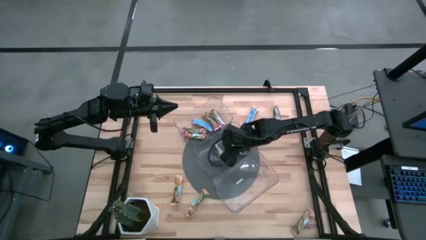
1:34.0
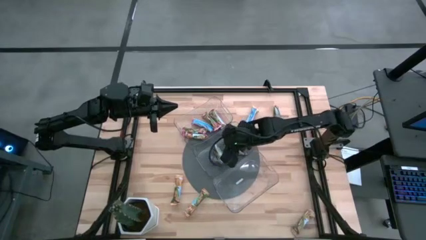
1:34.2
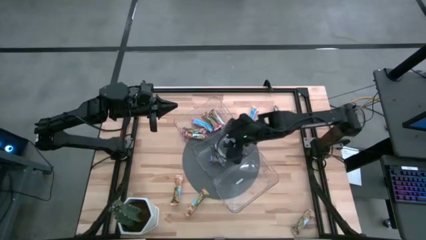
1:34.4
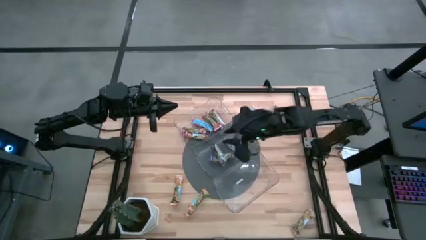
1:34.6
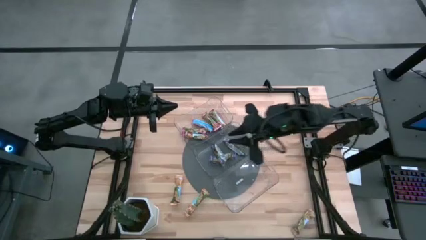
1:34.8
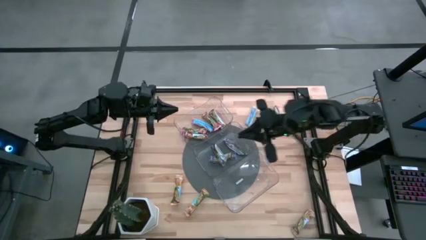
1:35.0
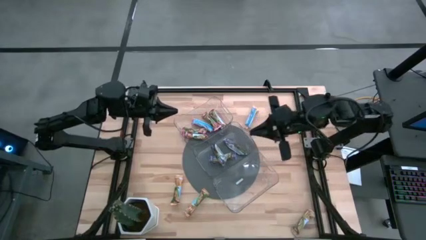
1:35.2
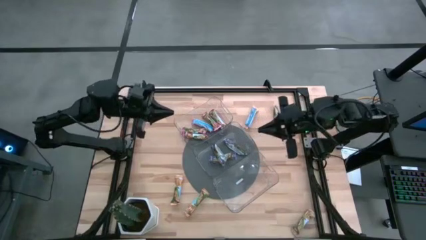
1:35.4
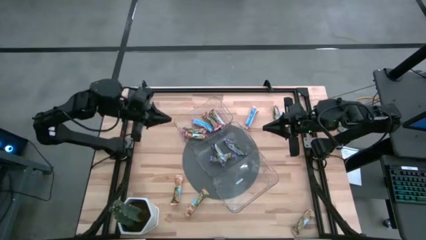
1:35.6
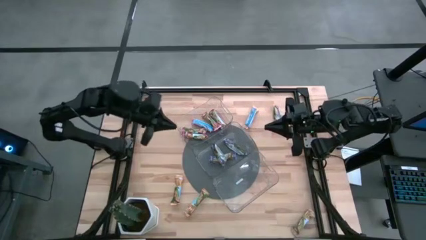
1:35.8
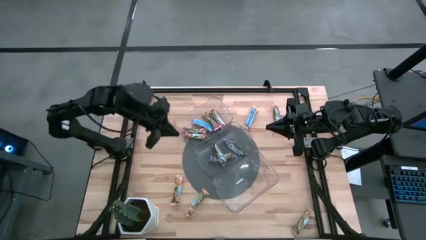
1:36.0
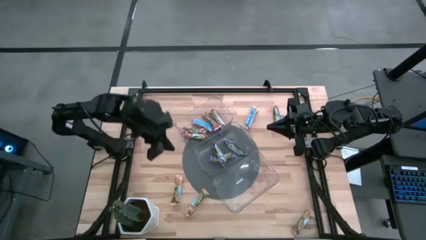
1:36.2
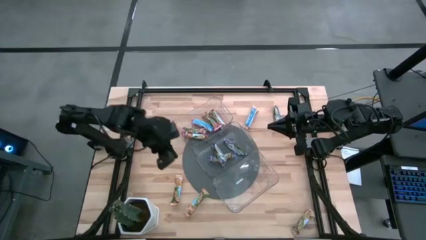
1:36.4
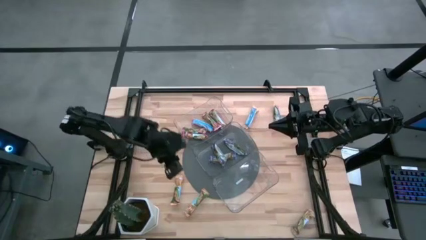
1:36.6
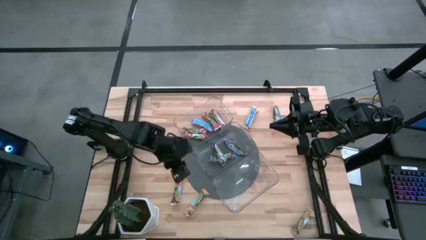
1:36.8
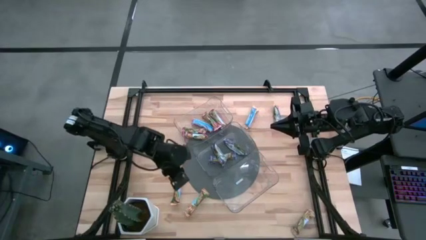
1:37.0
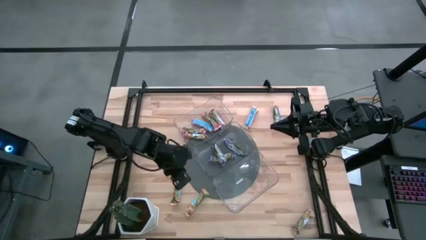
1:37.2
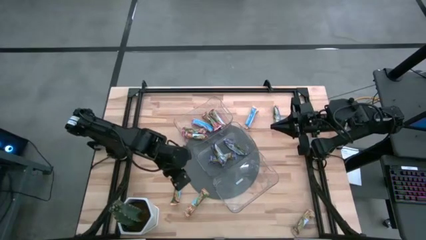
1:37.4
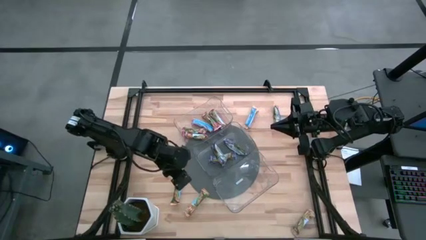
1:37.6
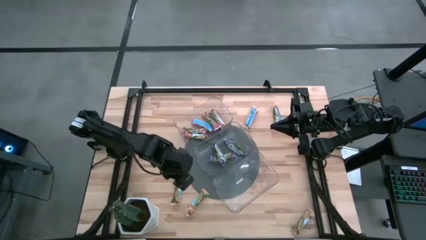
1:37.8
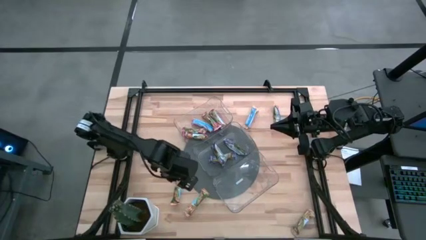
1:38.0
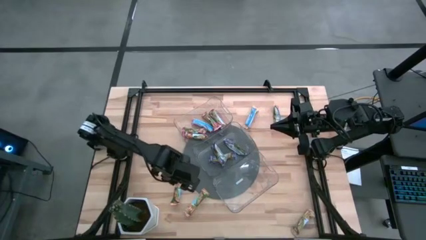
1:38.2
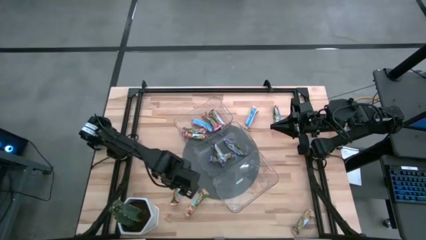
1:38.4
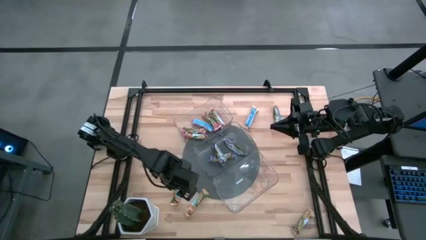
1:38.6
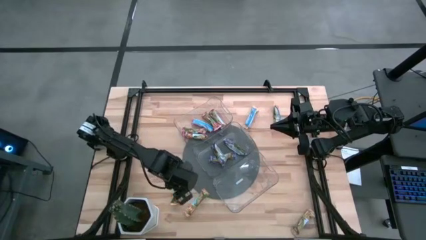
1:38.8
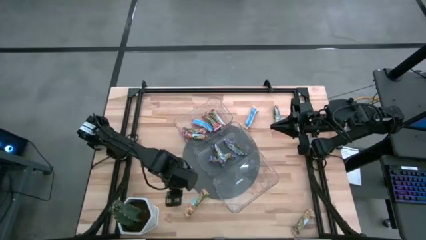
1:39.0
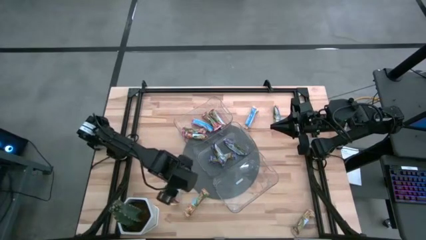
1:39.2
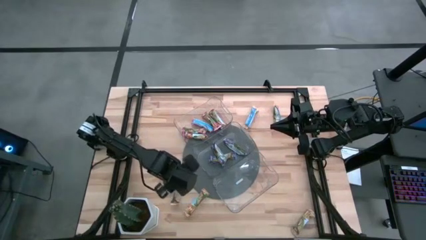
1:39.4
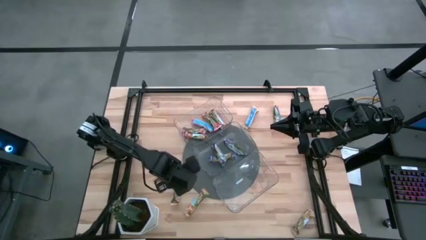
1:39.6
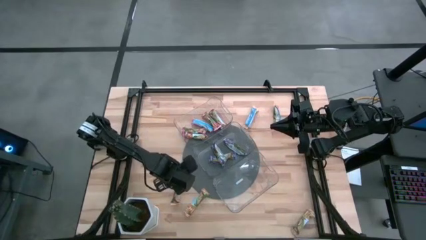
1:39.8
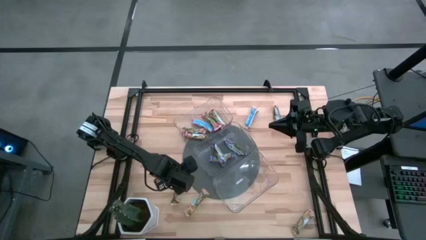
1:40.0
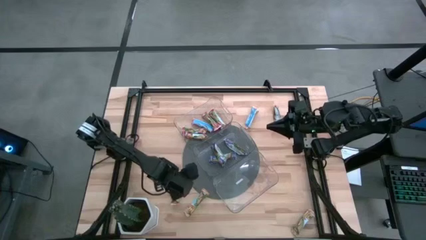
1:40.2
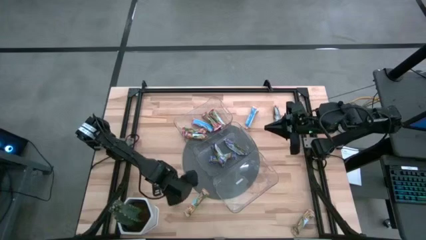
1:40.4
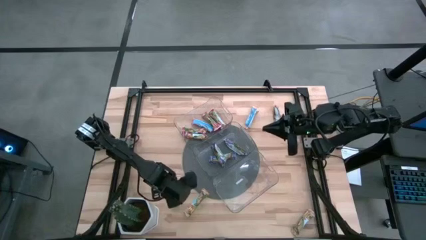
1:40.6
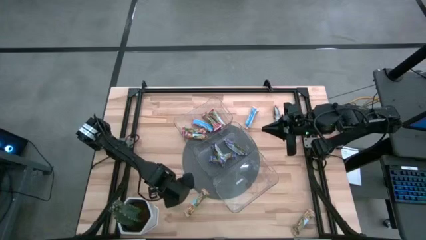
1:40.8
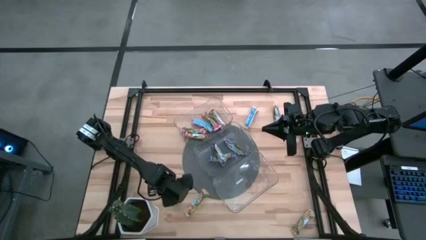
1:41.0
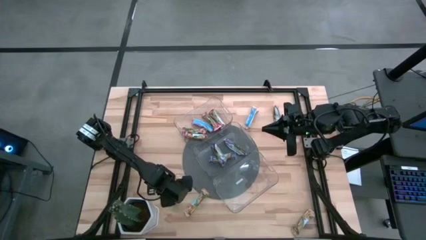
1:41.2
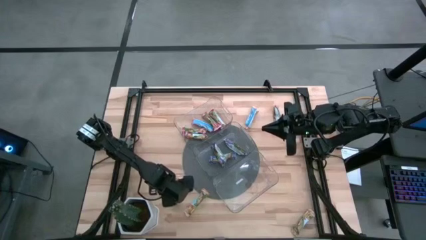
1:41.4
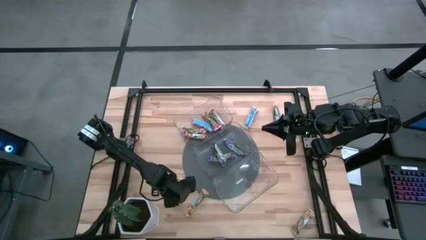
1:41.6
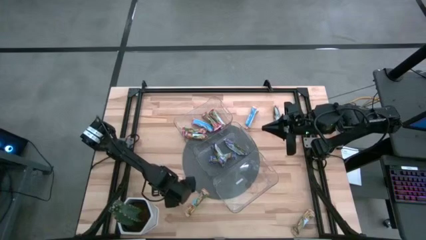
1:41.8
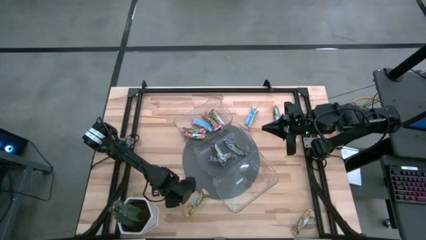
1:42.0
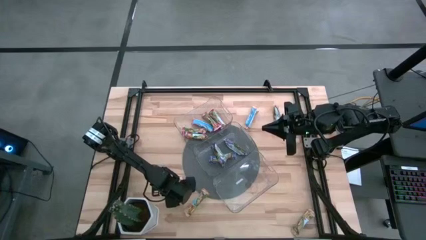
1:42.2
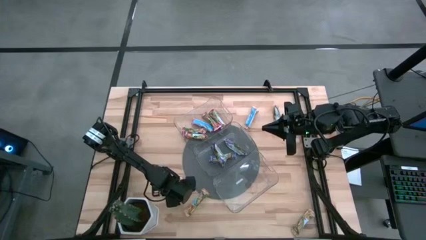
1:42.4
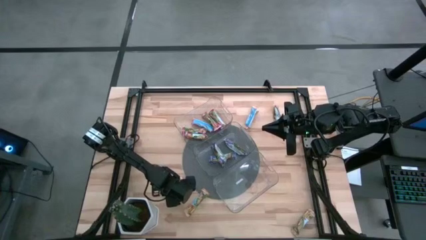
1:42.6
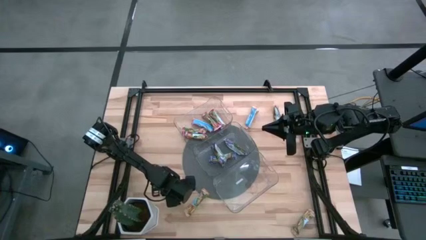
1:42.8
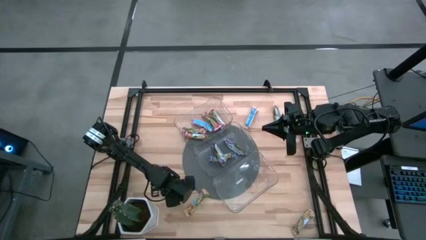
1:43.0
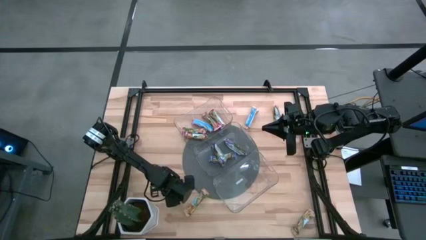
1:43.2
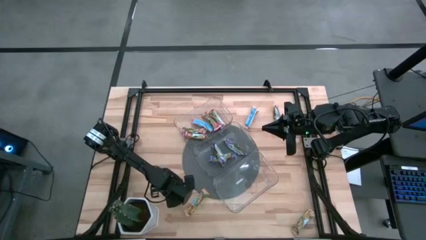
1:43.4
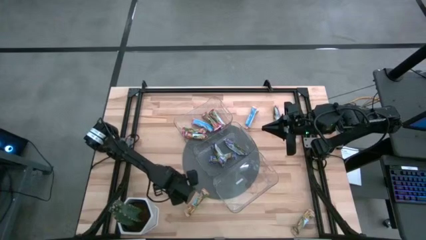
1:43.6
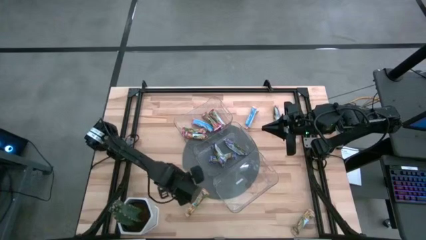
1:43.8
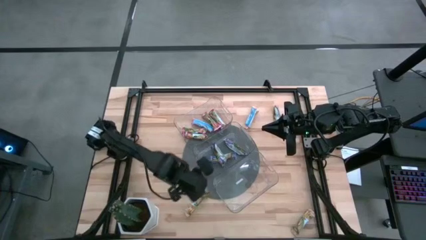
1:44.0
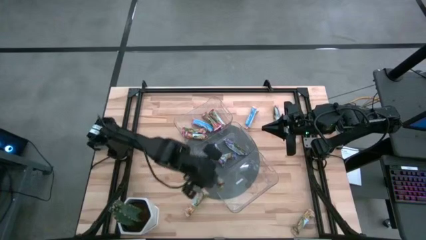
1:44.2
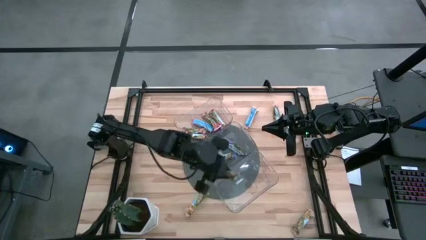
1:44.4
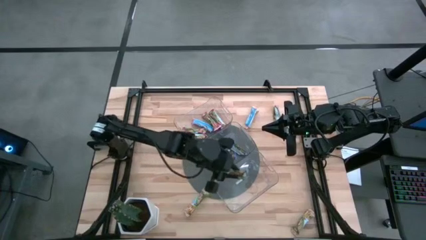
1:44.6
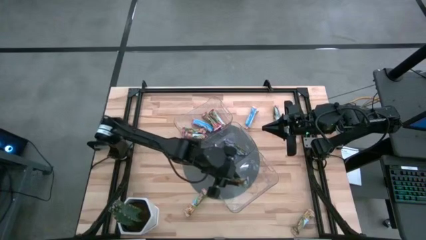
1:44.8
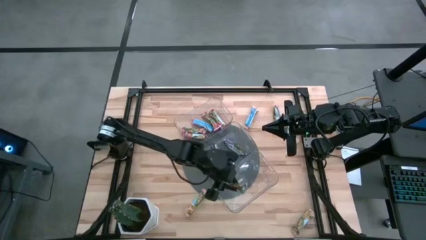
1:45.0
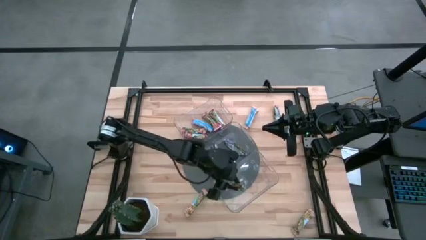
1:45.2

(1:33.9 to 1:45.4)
Task: Pick and place Granola Bars by type
Put the yellow granola bar into the bottom transparent bin

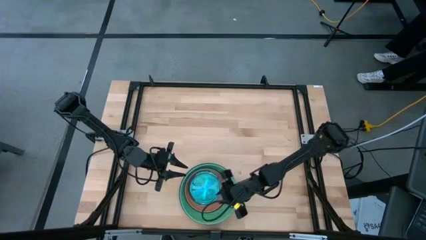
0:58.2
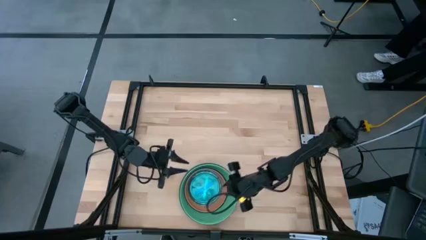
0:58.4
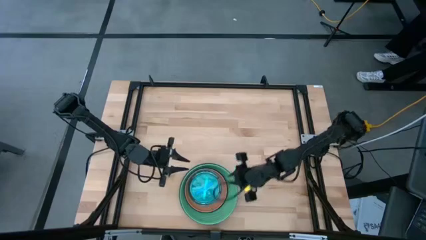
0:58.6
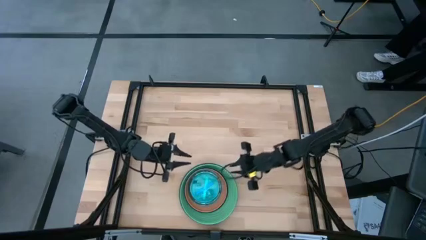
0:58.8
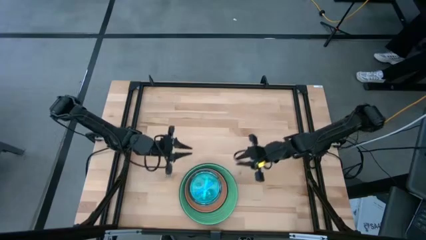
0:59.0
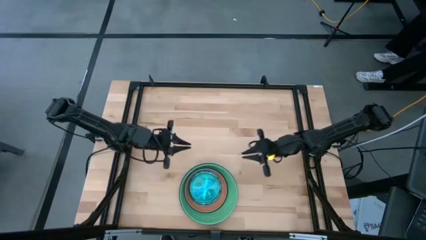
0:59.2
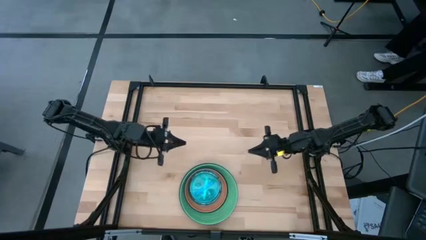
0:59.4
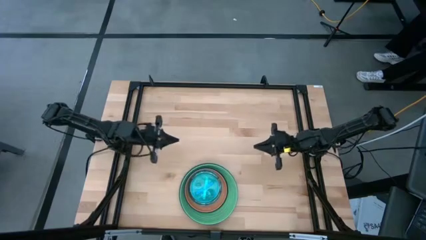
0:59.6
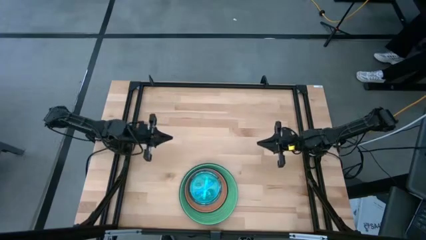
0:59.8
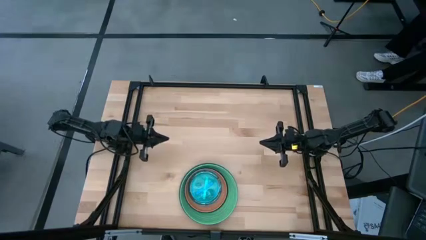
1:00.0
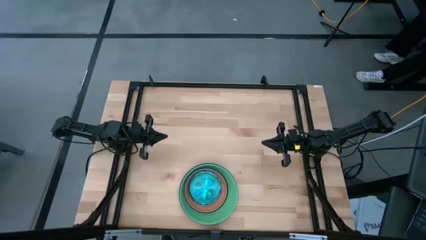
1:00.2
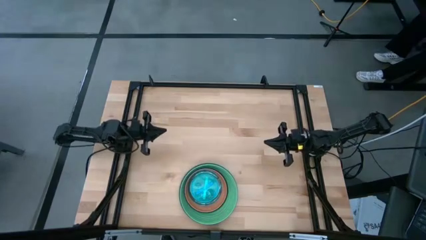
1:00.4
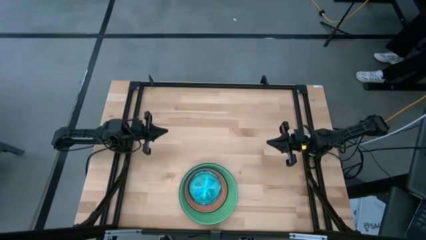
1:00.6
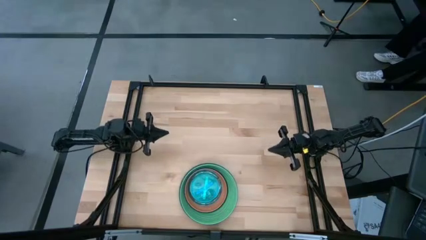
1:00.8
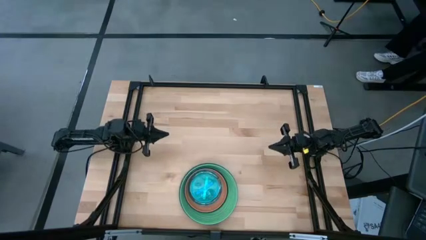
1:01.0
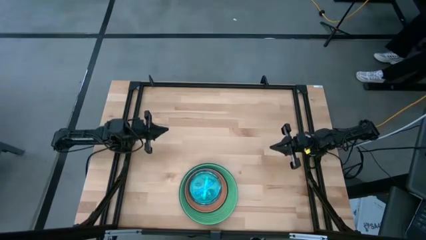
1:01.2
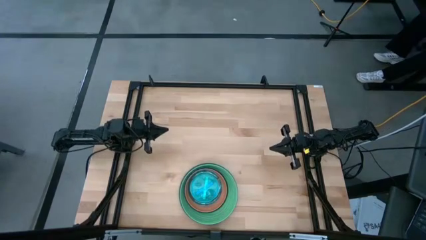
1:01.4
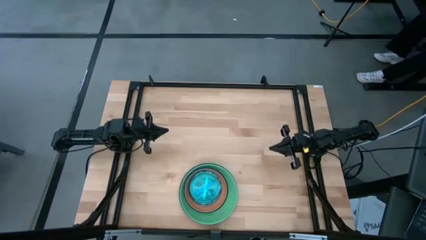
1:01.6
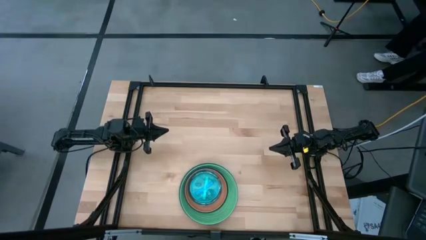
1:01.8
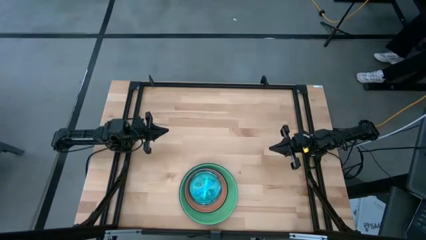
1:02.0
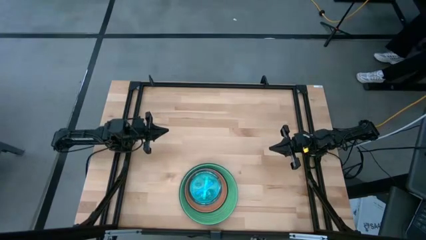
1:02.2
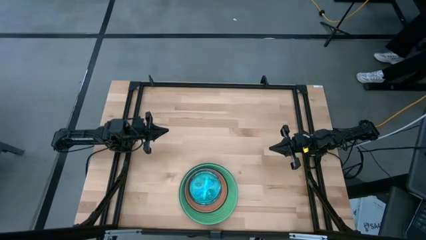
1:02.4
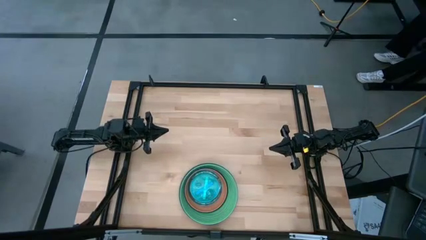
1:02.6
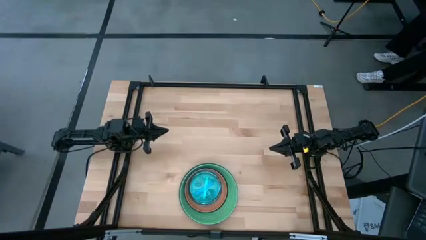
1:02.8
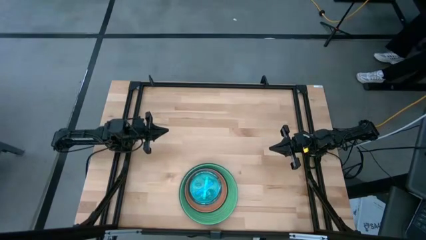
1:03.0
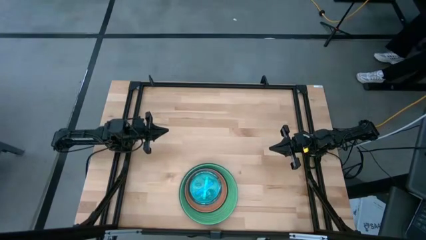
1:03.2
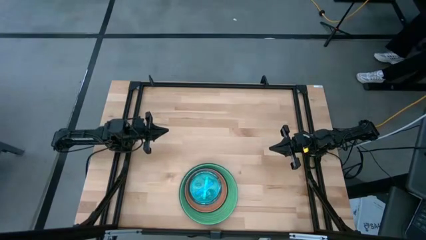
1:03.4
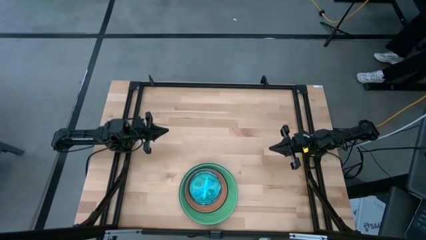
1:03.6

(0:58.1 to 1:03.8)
Task: Stack plastic plates
Return to Home Position
